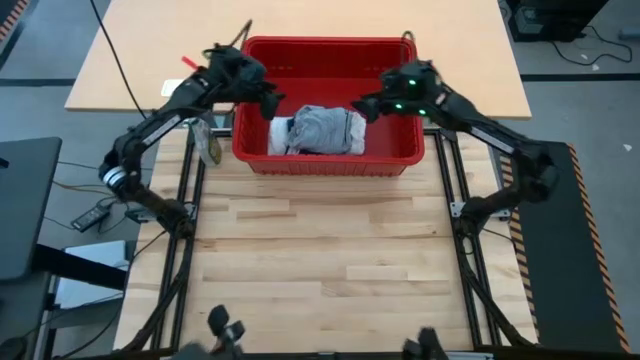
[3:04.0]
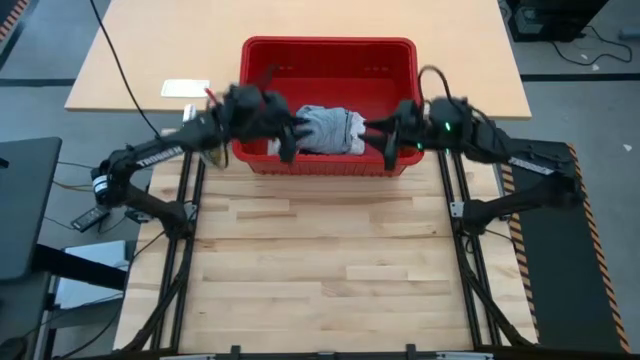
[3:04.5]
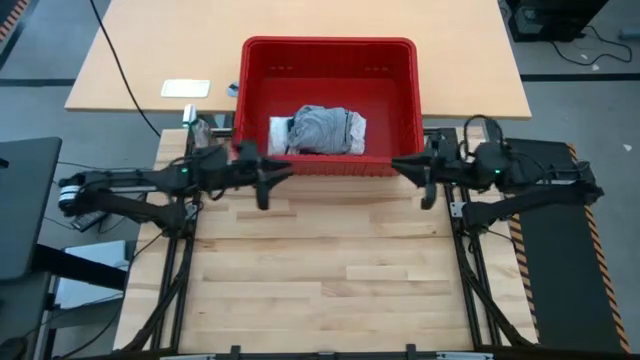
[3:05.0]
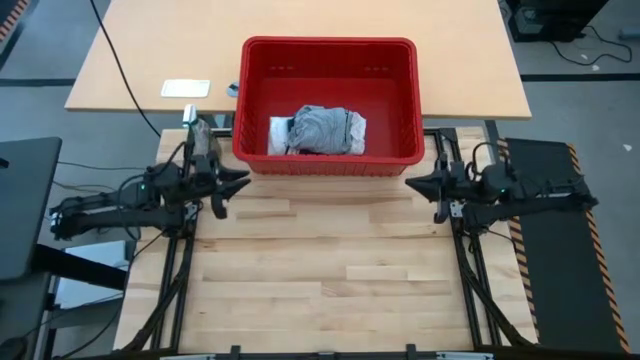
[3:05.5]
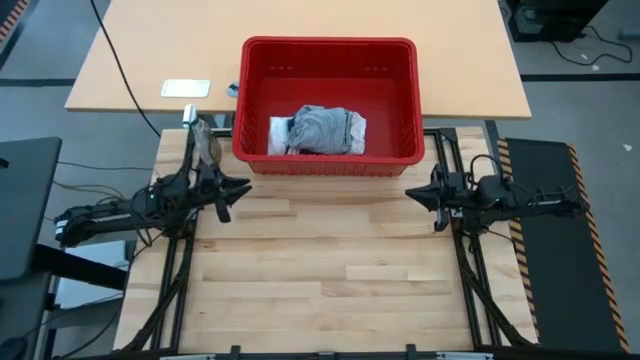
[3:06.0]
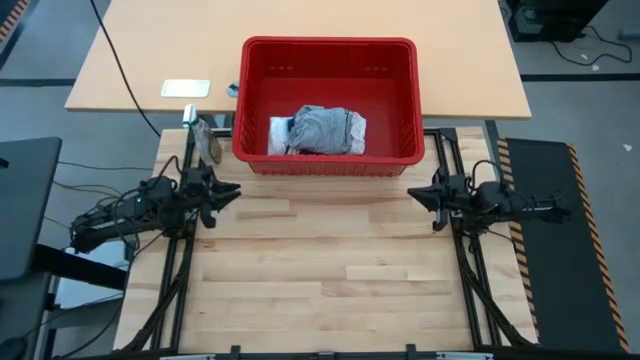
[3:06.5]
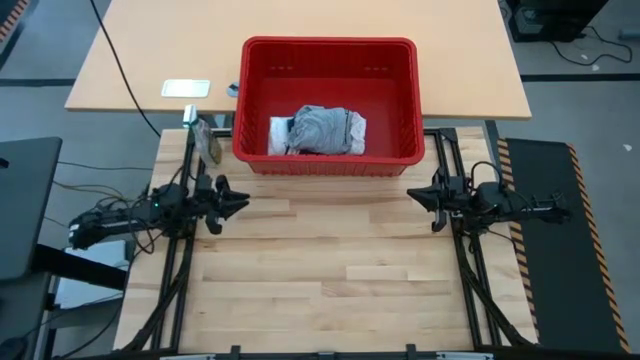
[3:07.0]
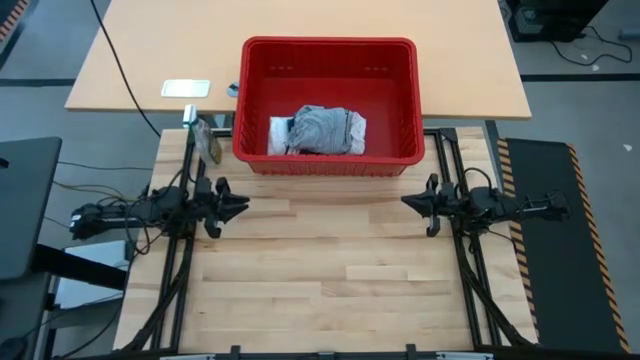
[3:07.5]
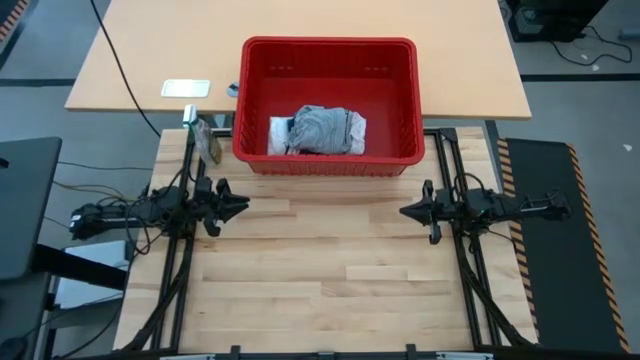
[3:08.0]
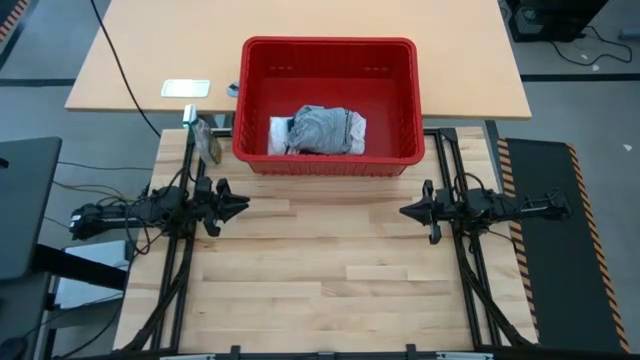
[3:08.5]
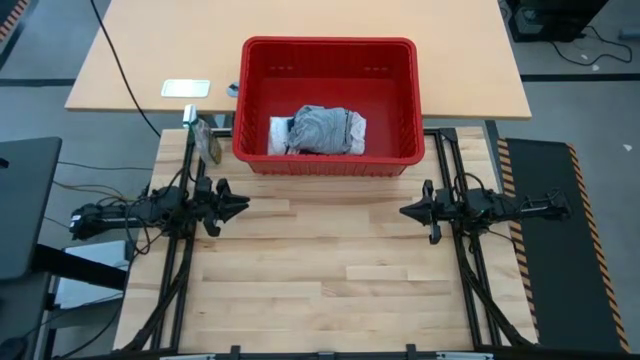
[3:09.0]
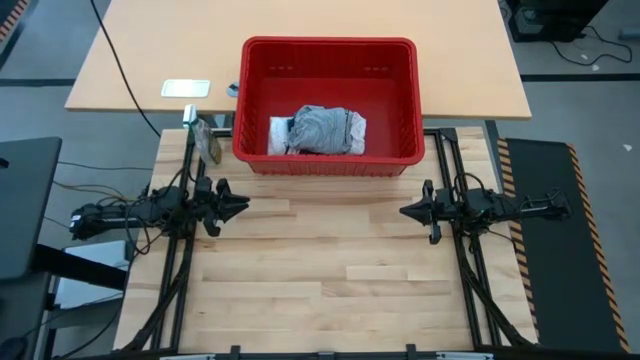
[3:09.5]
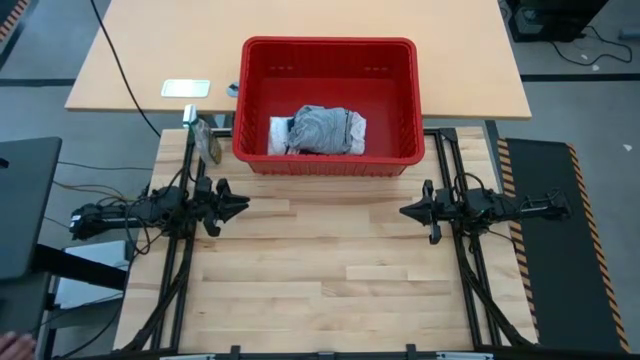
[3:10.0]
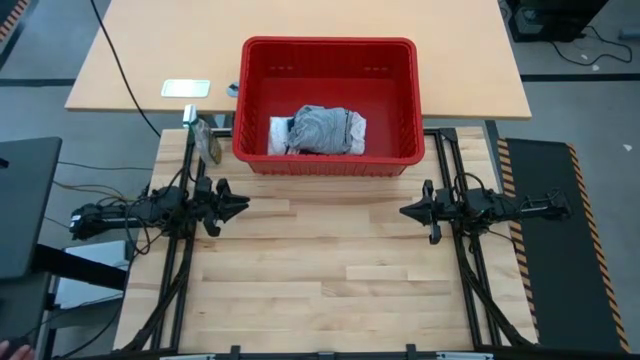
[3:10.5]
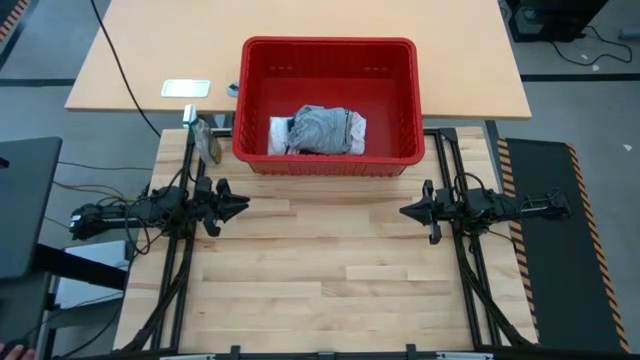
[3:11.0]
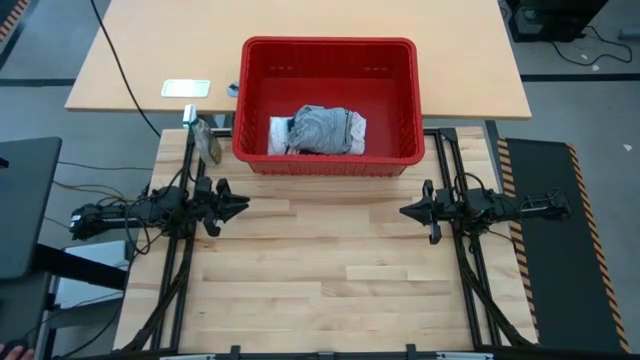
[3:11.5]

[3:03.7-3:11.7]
Task: Fold laundry
Return to Home Position

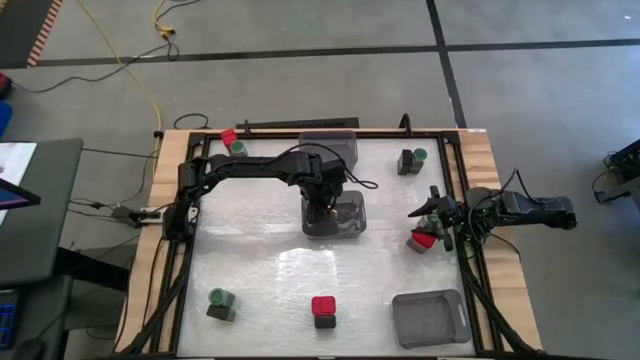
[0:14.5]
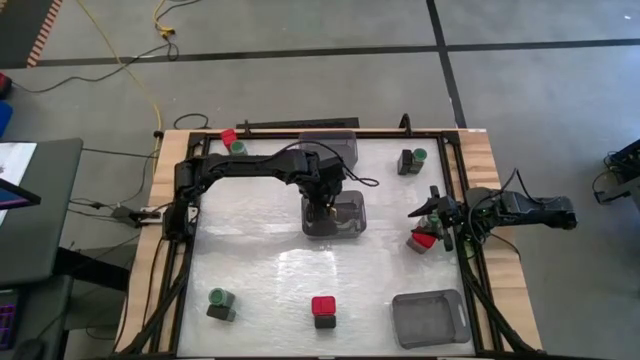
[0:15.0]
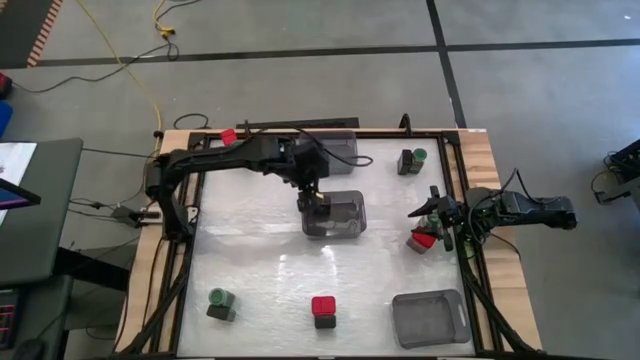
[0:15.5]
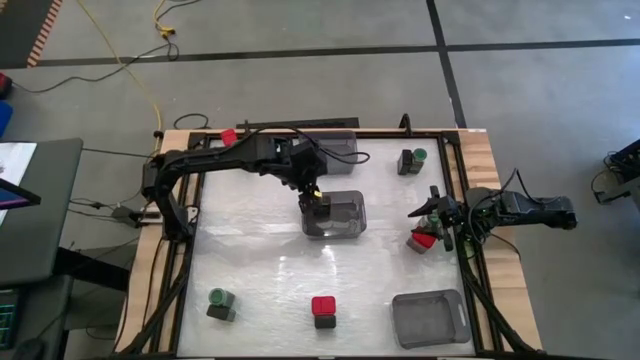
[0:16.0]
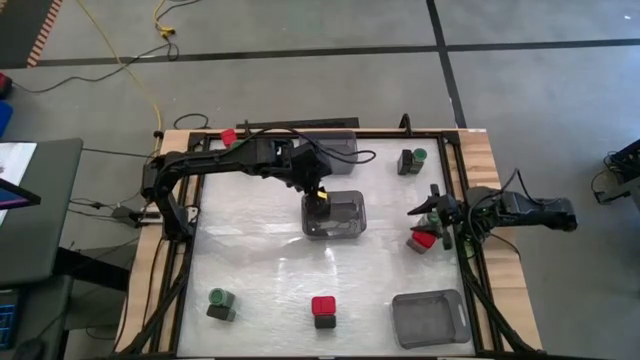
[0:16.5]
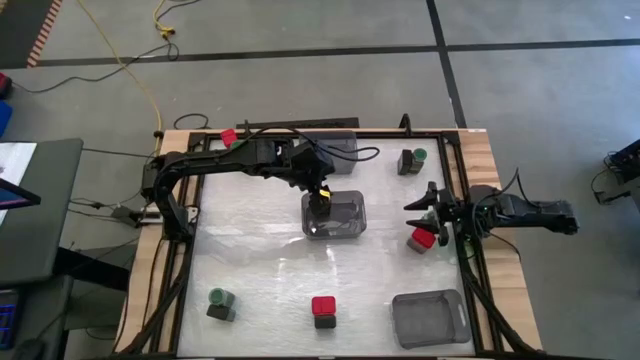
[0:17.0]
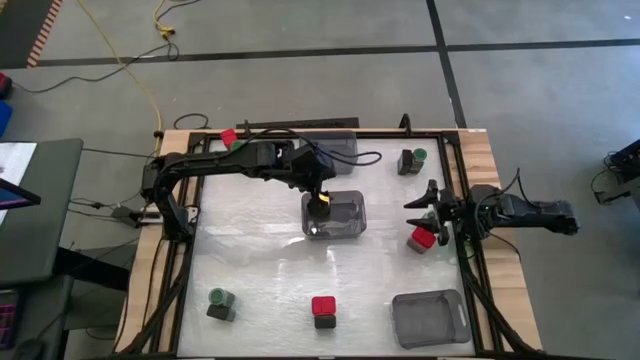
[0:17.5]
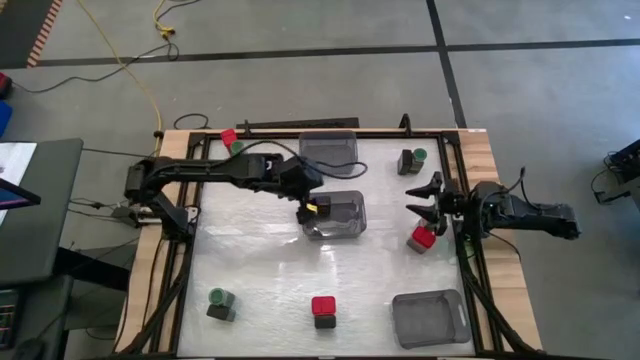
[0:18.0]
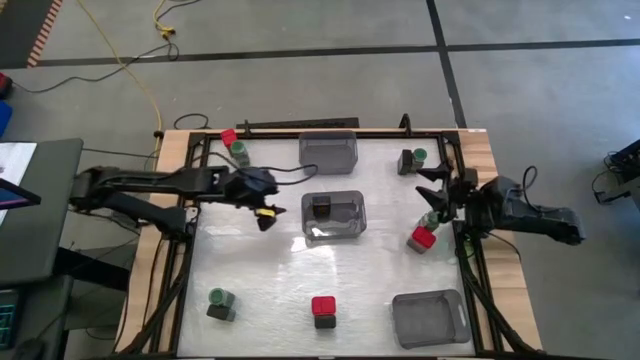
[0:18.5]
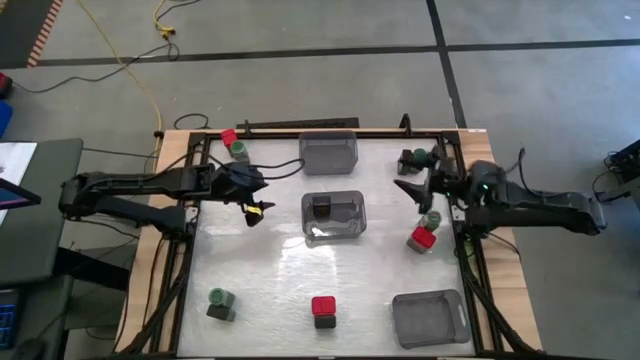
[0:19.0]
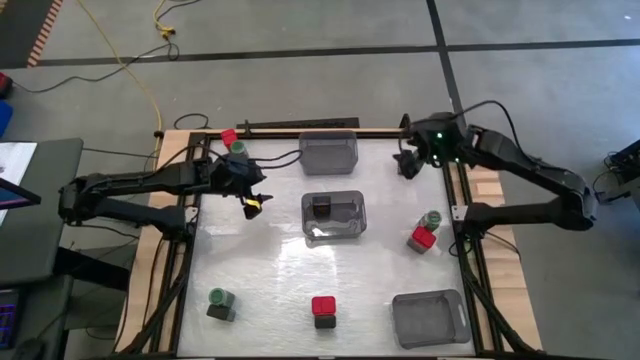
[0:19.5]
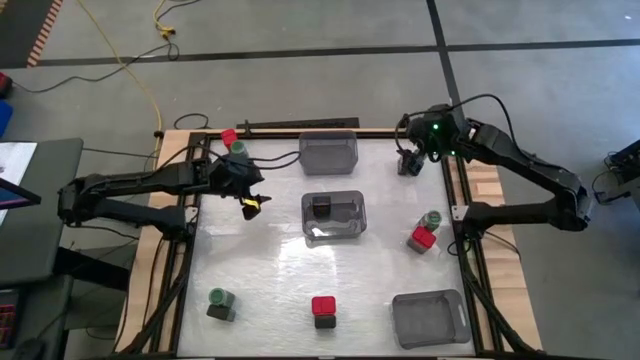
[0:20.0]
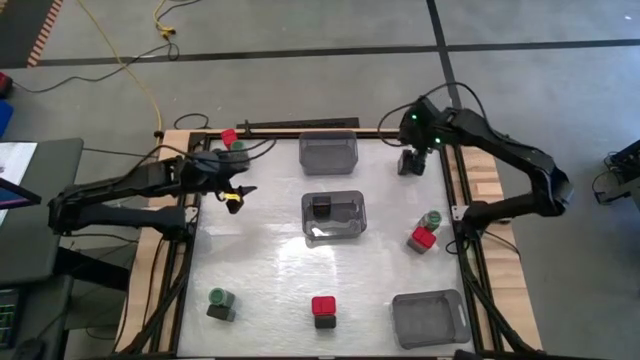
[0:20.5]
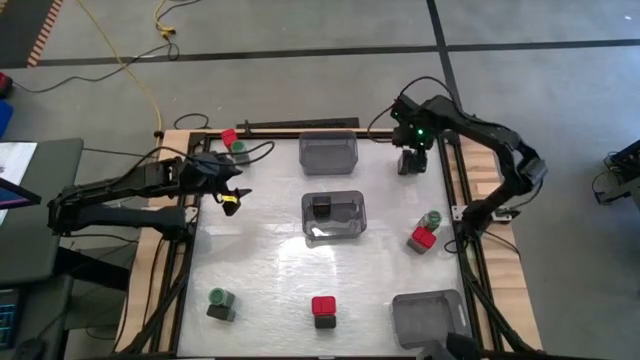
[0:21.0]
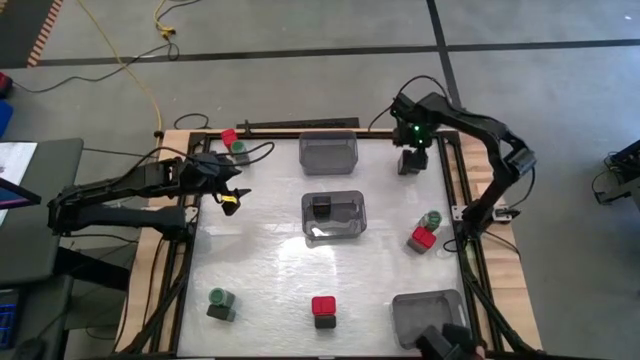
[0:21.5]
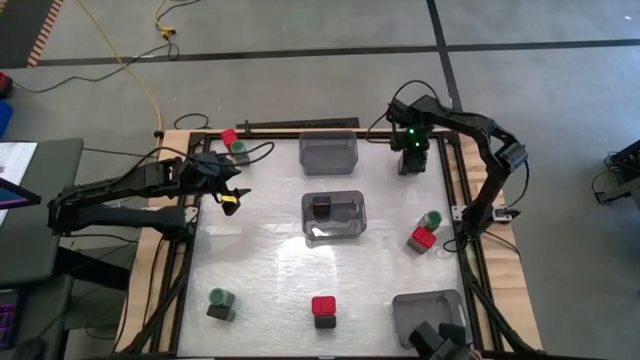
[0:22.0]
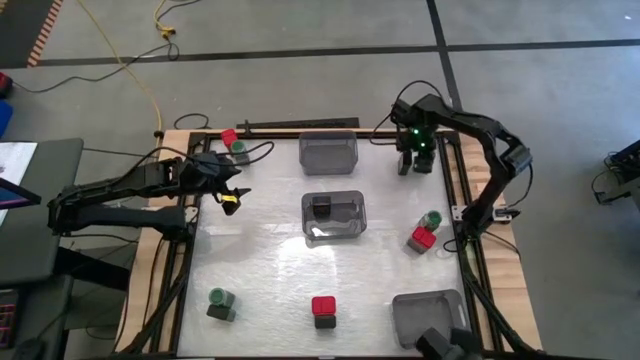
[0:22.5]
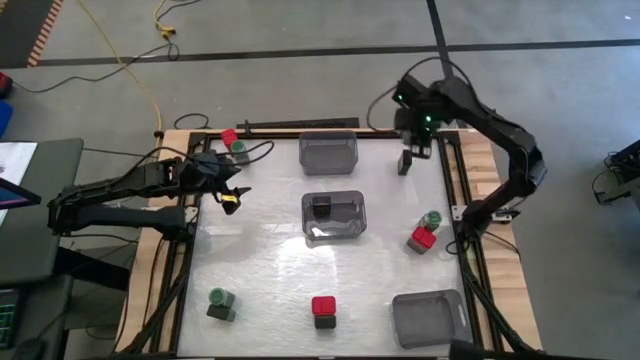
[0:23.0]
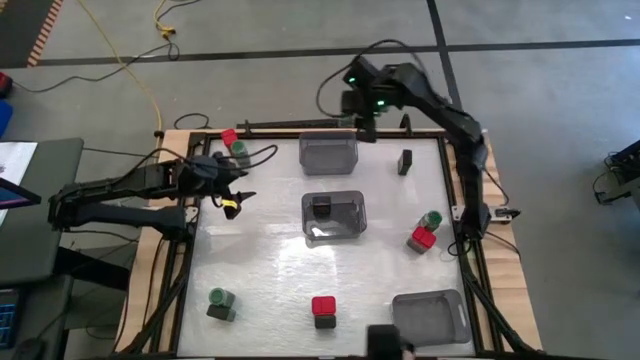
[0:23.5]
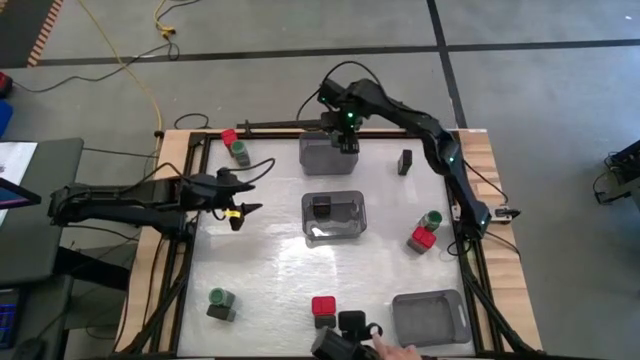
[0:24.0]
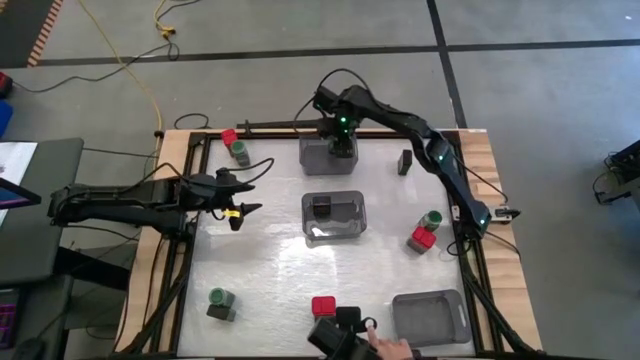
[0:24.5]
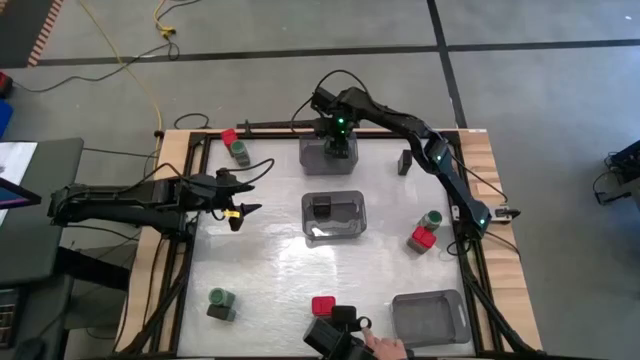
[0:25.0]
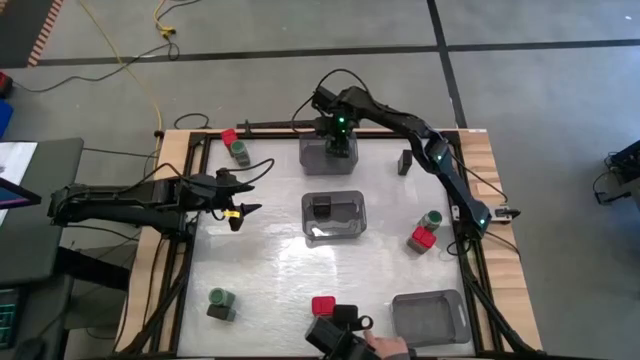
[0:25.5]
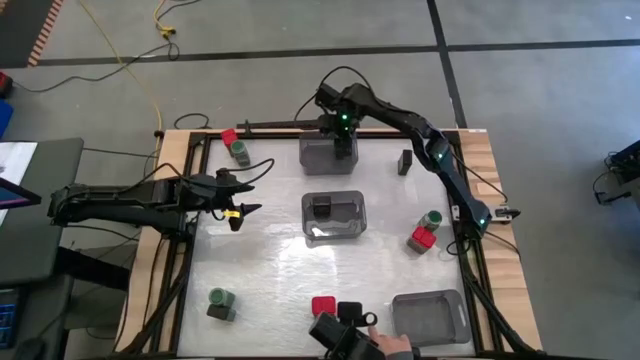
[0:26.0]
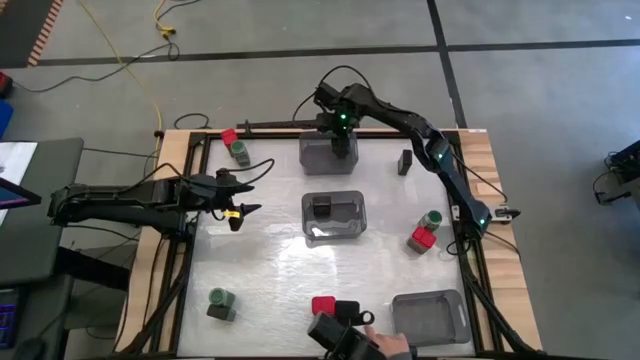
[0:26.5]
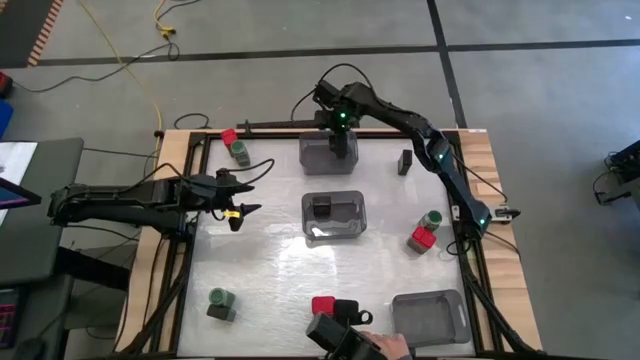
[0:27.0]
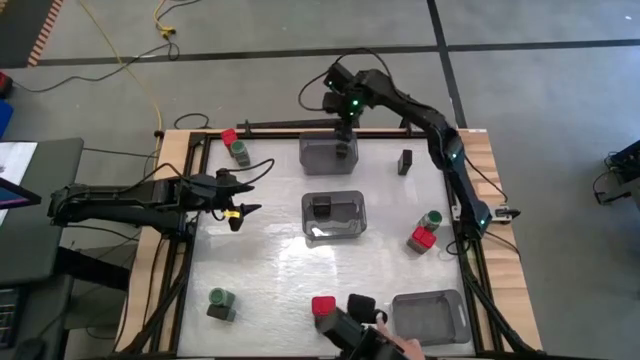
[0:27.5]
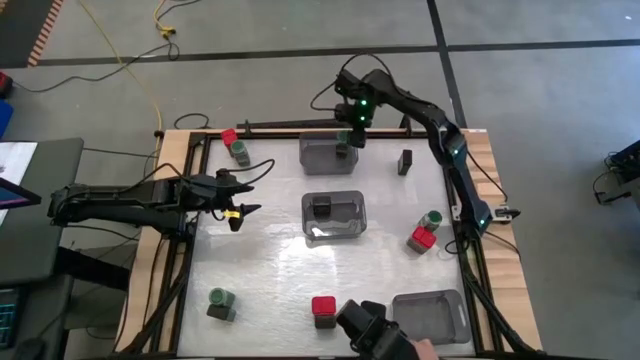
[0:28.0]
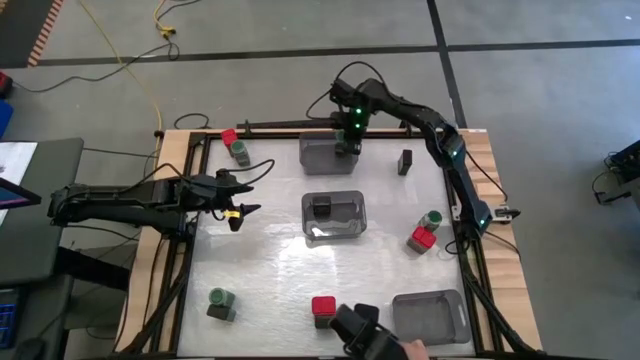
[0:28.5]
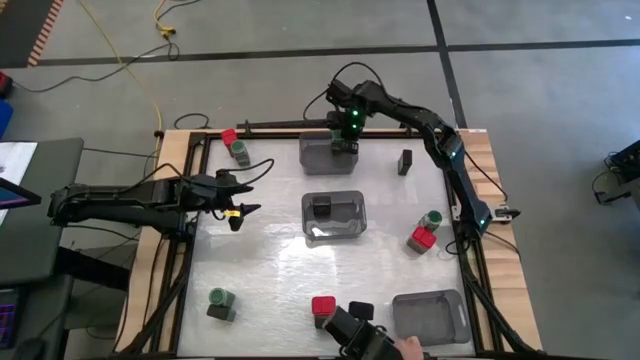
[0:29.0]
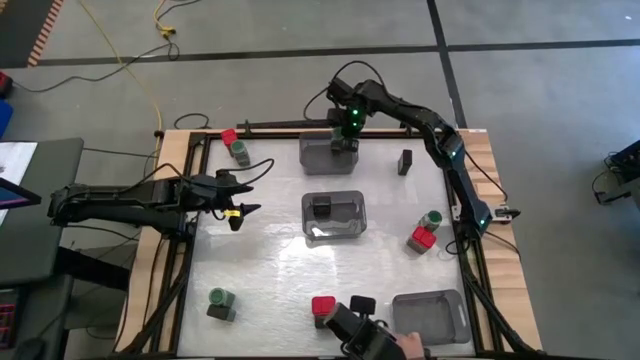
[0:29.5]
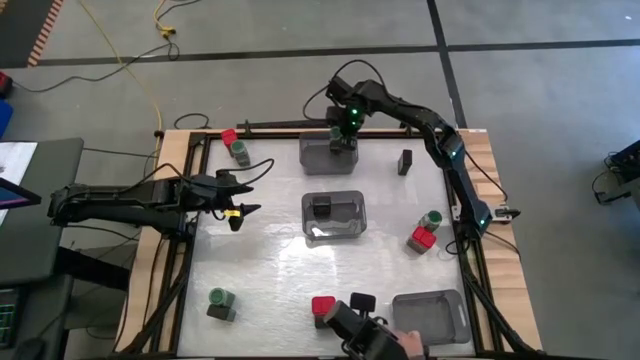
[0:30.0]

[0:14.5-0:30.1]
Task: Sort spices by type
Put the green seasoning bottle into the top black bin
